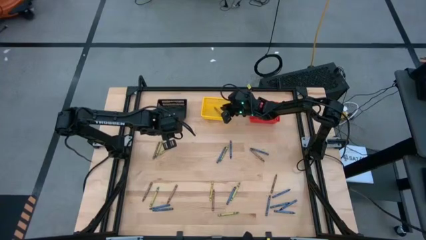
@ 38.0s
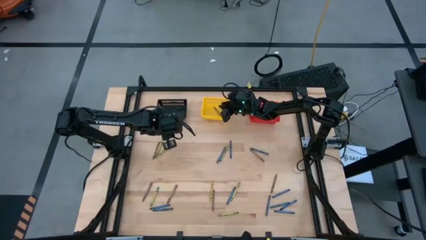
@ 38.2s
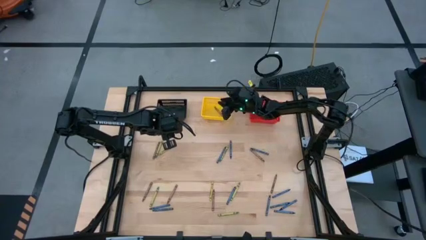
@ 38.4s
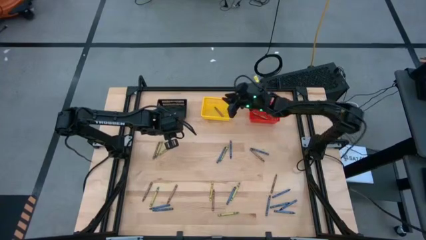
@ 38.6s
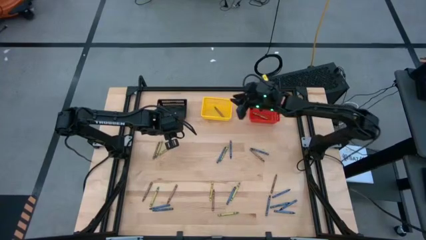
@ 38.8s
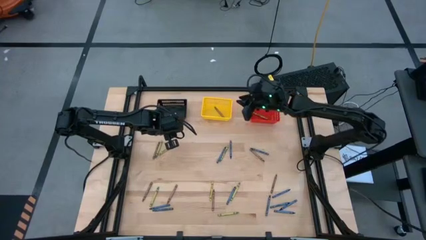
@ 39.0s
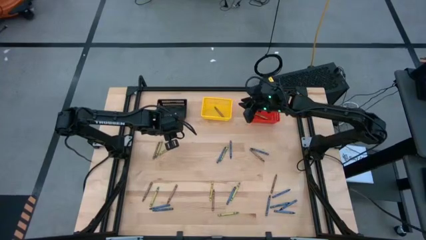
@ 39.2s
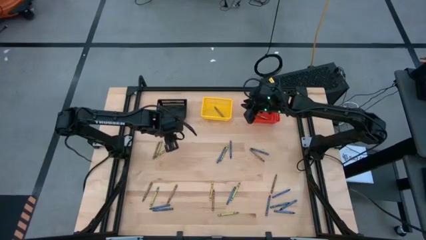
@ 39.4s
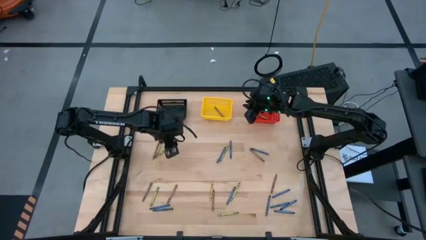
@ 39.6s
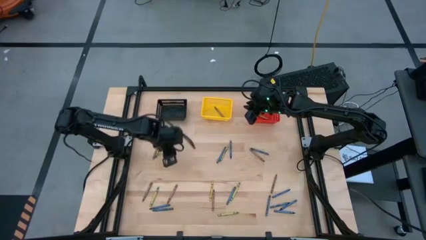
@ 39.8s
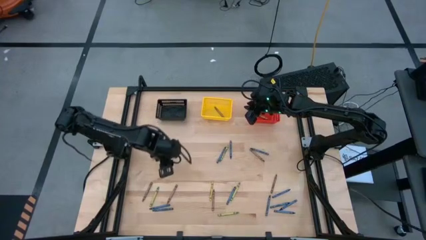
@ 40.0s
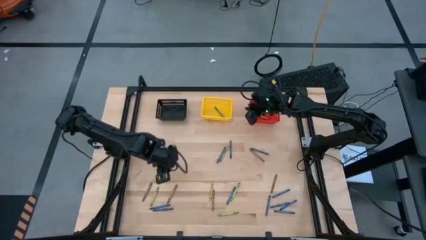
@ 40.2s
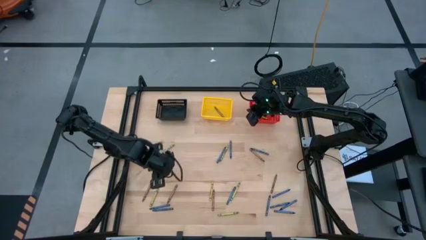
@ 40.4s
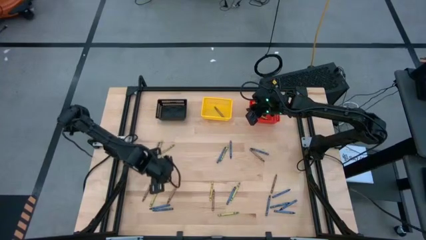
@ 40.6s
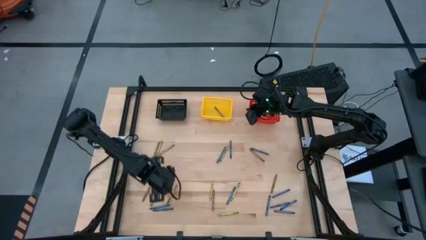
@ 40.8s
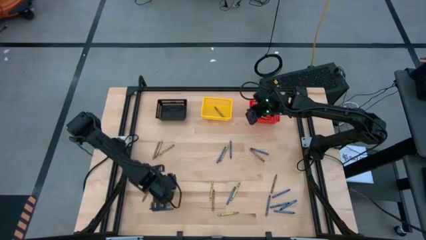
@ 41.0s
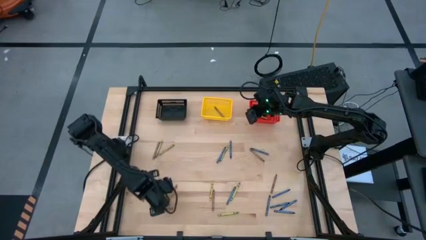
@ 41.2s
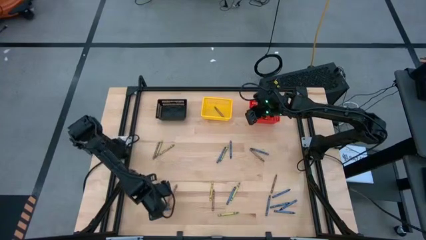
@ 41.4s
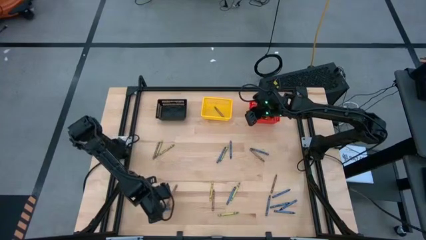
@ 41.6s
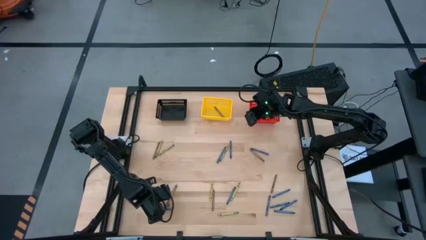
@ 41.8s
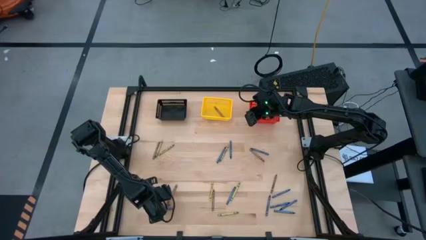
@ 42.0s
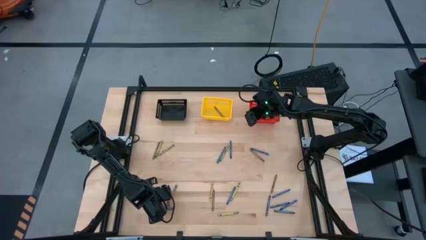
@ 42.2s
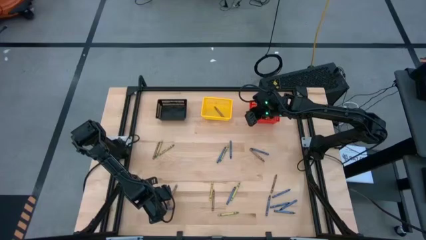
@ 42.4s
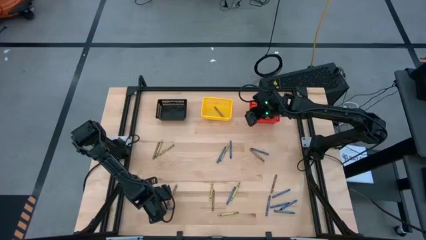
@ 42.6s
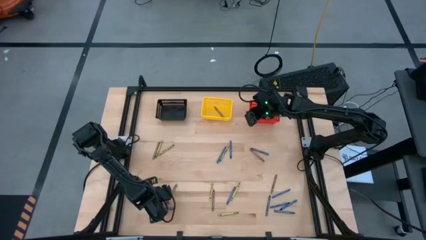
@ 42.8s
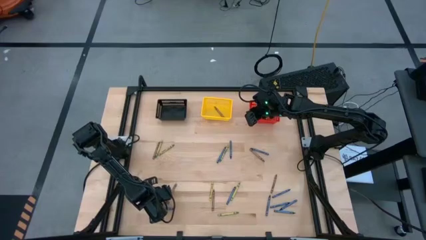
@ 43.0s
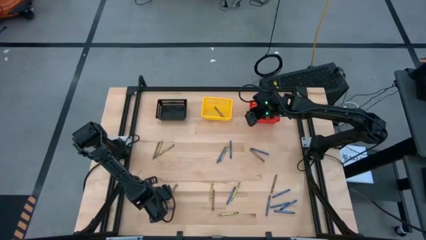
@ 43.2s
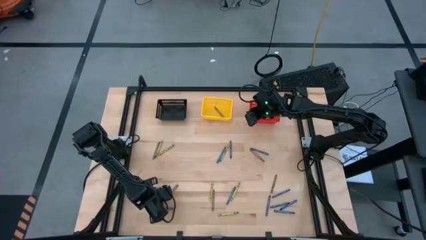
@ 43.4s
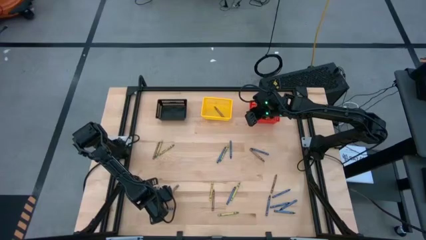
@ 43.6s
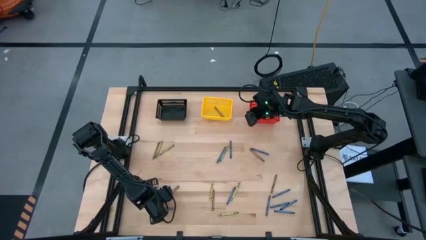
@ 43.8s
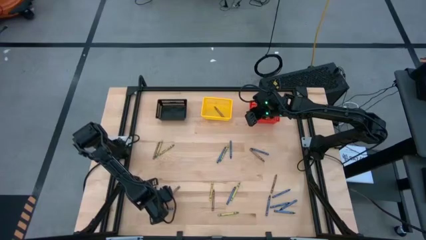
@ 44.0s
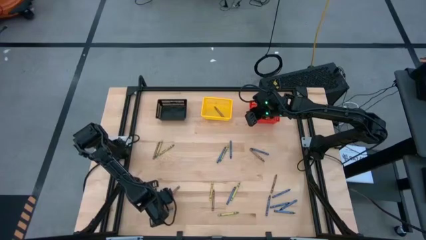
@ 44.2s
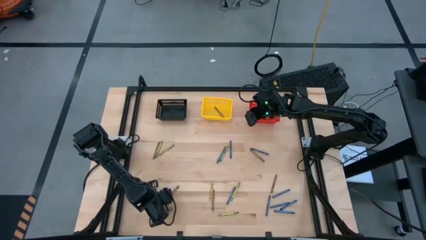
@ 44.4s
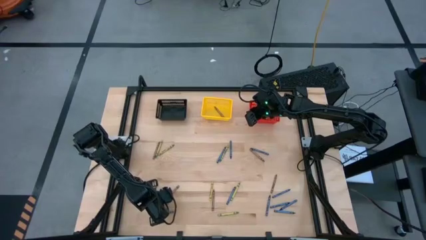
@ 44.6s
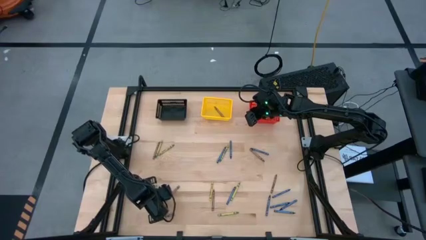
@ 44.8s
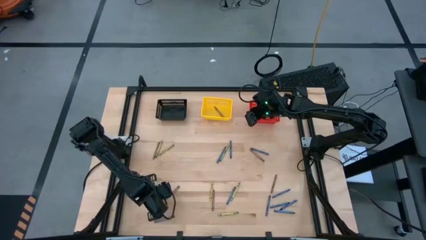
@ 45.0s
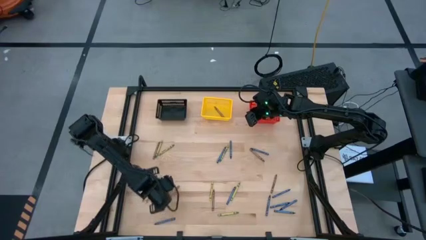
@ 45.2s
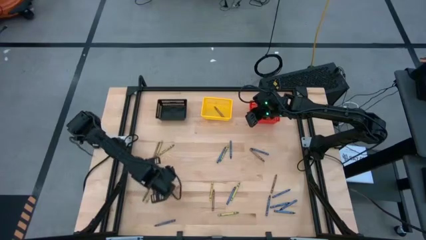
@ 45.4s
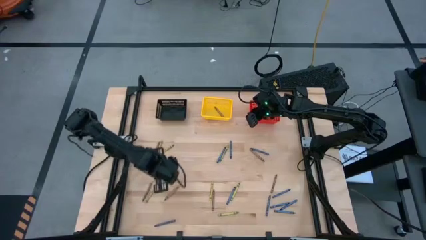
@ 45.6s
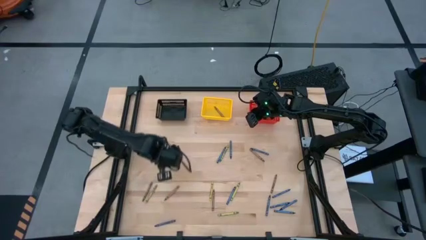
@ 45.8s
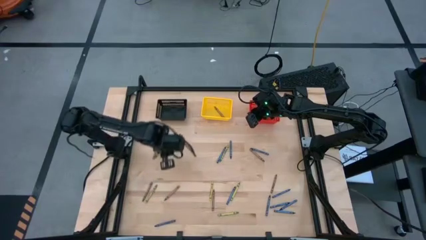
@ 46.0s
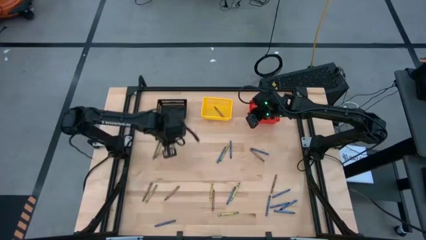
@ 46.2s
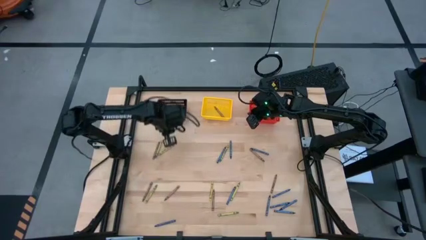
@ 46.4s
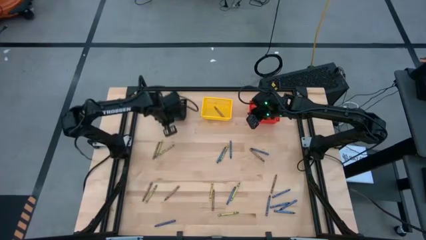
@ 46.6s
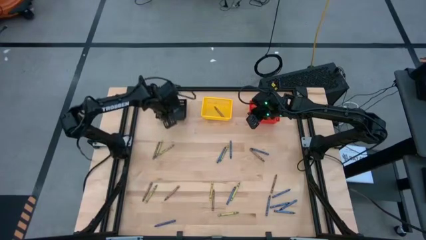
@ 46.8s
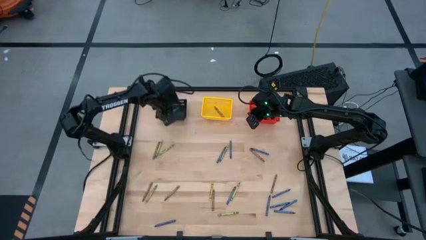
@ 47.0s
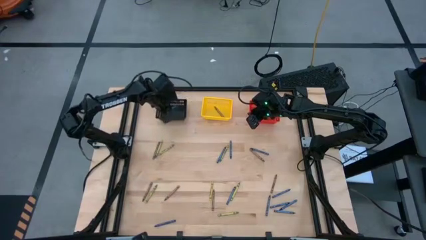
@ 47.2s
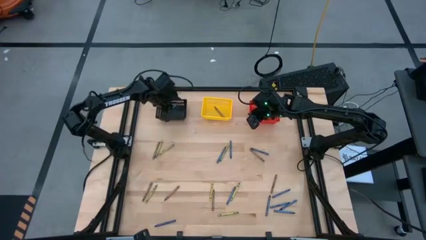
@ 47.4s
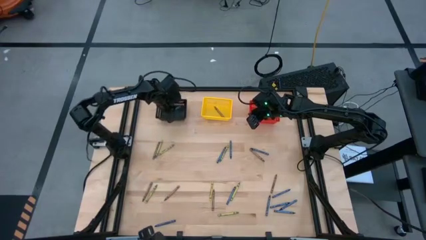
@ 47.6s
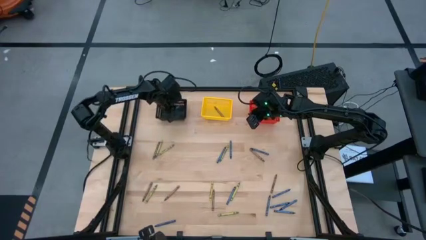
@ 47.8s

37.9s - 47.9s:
Task: Sort crayons
Put the blue crayon into the black bin
